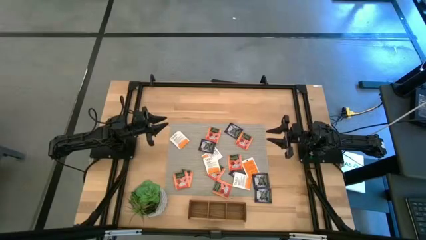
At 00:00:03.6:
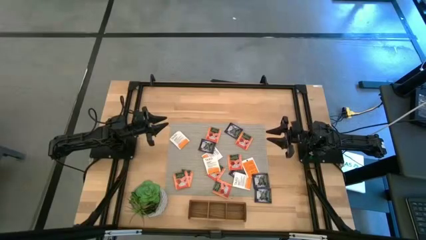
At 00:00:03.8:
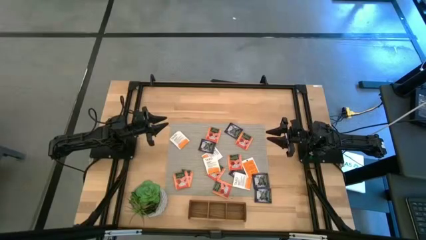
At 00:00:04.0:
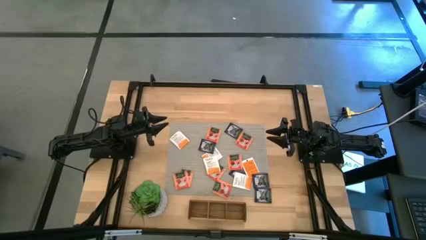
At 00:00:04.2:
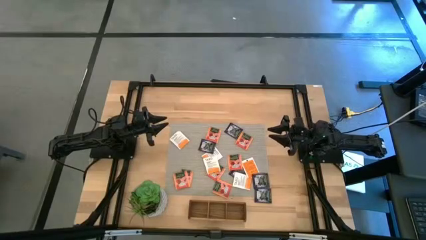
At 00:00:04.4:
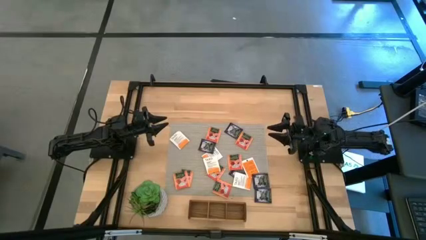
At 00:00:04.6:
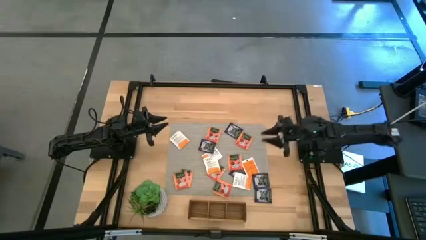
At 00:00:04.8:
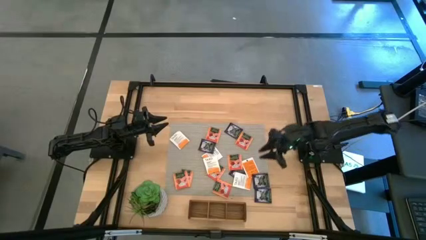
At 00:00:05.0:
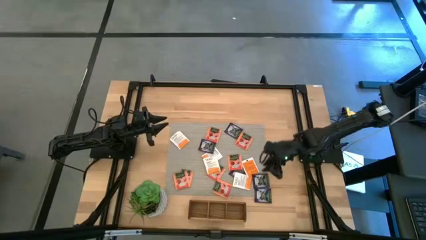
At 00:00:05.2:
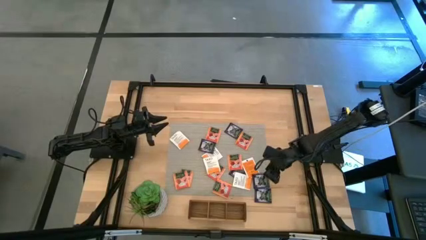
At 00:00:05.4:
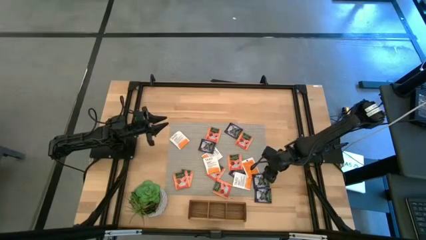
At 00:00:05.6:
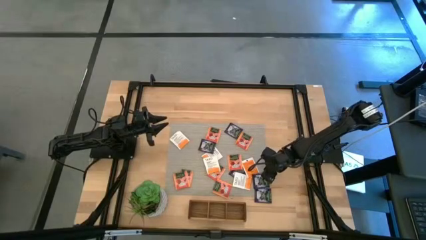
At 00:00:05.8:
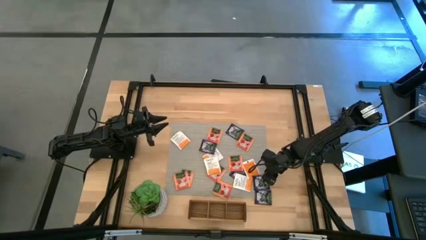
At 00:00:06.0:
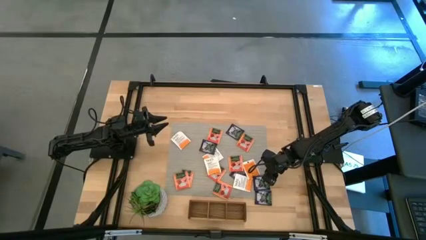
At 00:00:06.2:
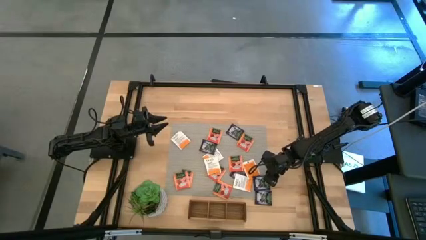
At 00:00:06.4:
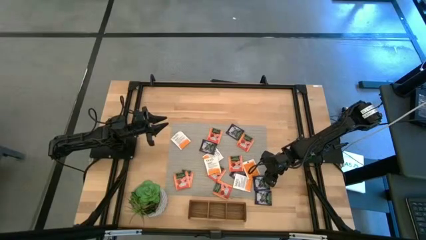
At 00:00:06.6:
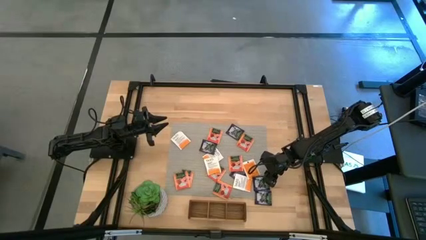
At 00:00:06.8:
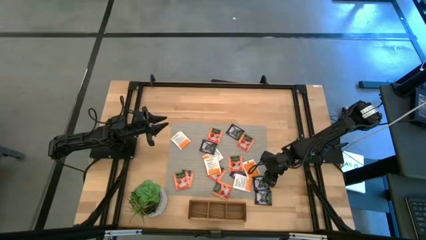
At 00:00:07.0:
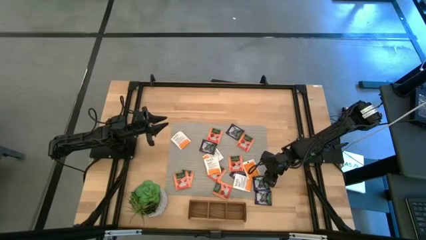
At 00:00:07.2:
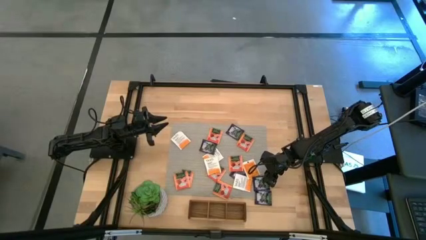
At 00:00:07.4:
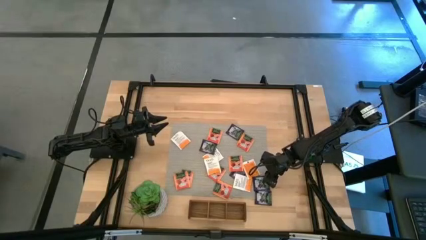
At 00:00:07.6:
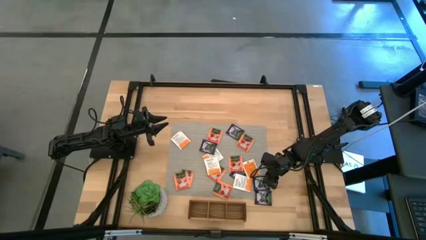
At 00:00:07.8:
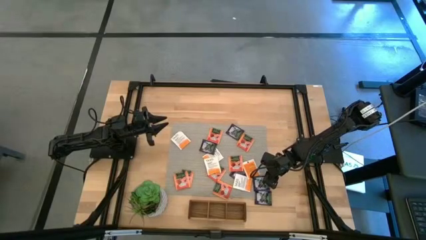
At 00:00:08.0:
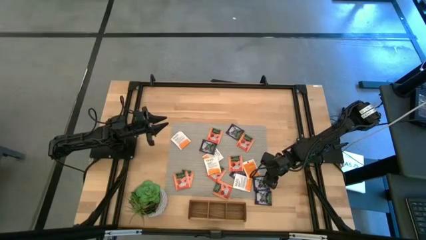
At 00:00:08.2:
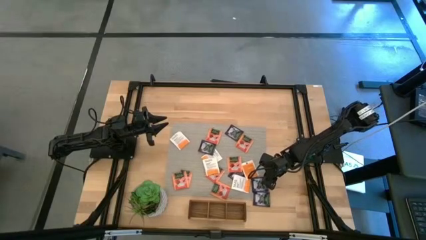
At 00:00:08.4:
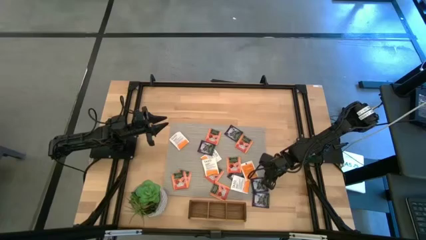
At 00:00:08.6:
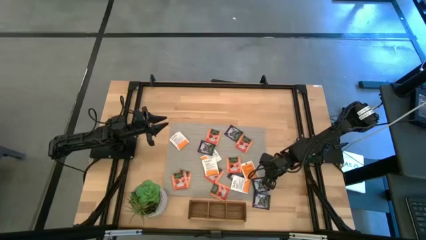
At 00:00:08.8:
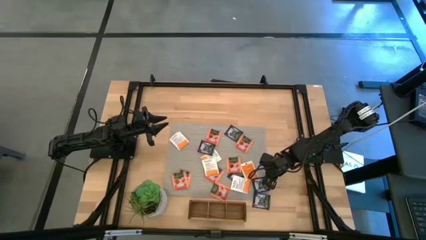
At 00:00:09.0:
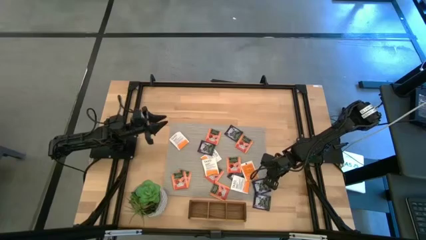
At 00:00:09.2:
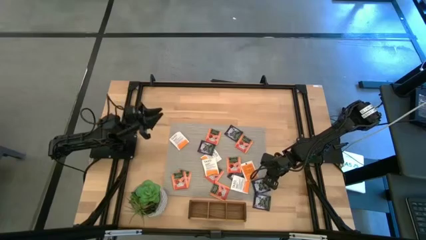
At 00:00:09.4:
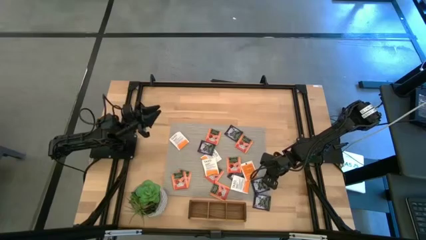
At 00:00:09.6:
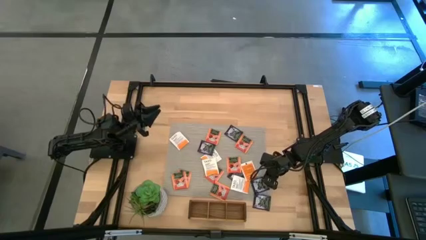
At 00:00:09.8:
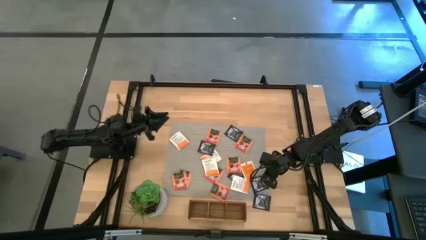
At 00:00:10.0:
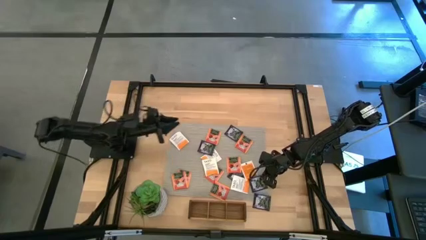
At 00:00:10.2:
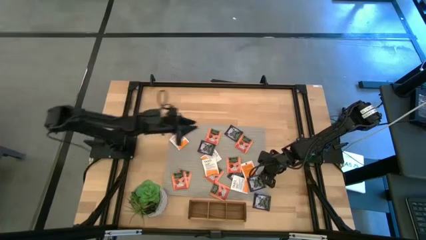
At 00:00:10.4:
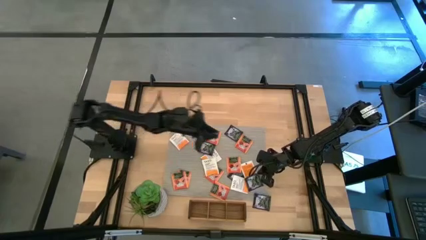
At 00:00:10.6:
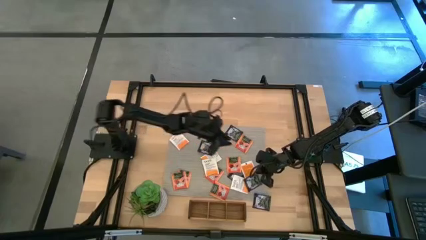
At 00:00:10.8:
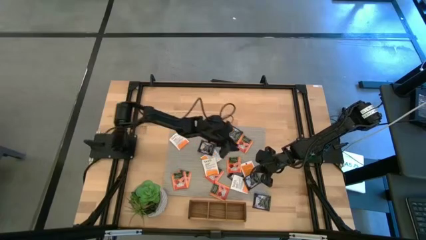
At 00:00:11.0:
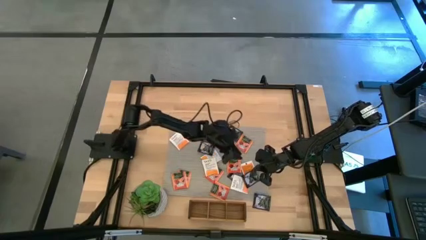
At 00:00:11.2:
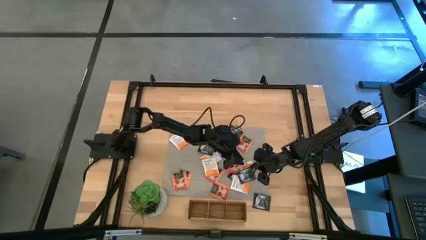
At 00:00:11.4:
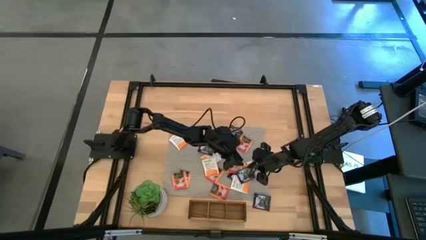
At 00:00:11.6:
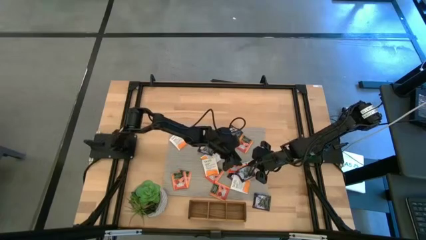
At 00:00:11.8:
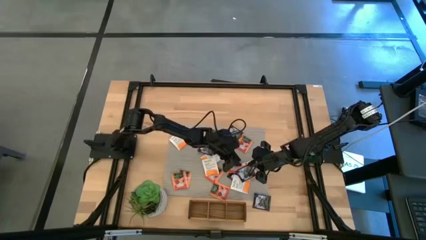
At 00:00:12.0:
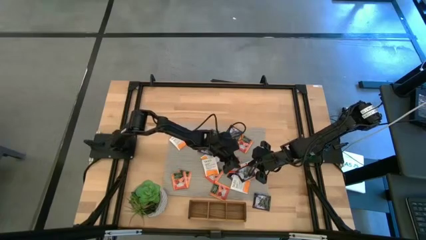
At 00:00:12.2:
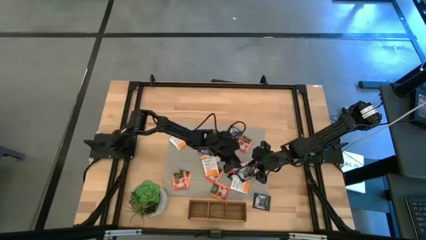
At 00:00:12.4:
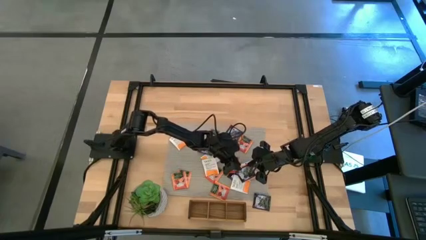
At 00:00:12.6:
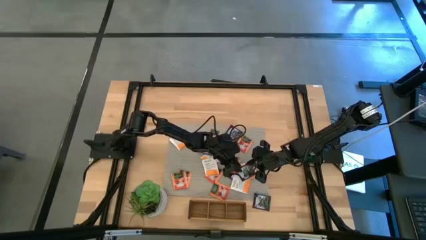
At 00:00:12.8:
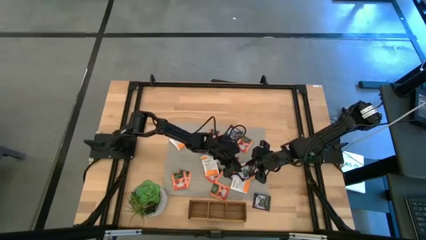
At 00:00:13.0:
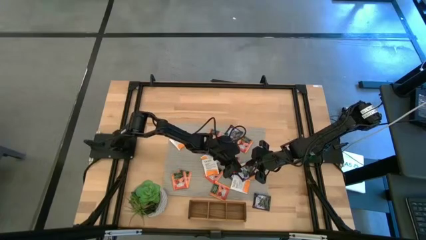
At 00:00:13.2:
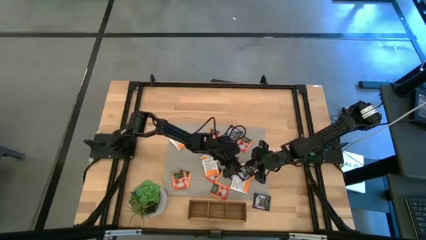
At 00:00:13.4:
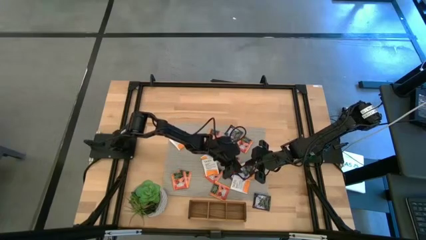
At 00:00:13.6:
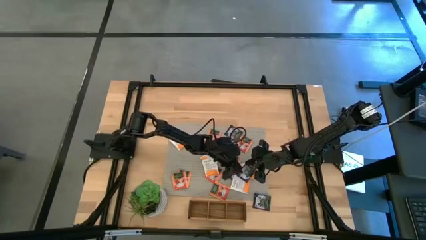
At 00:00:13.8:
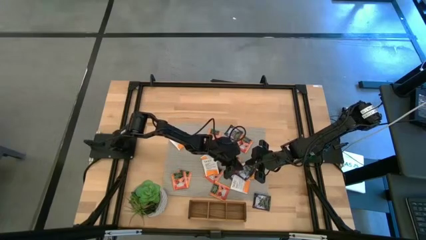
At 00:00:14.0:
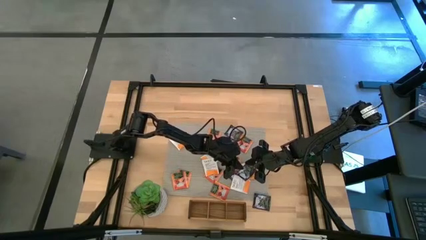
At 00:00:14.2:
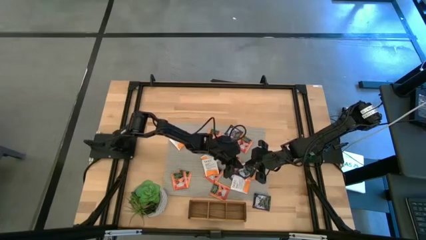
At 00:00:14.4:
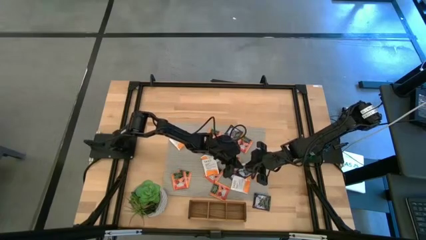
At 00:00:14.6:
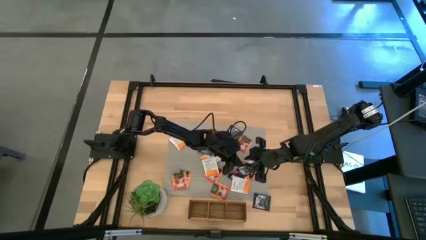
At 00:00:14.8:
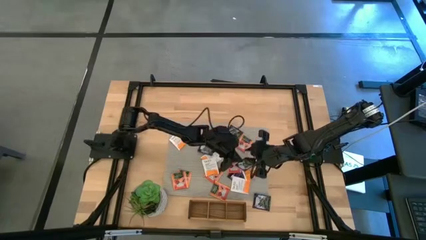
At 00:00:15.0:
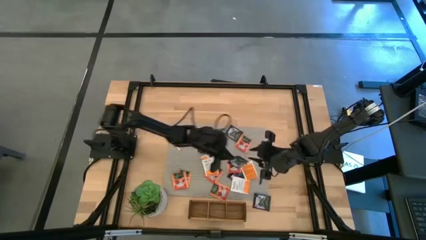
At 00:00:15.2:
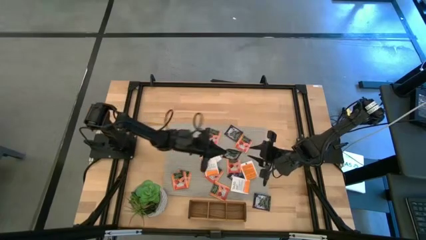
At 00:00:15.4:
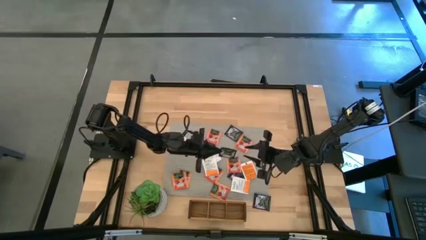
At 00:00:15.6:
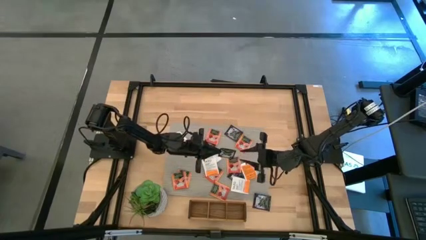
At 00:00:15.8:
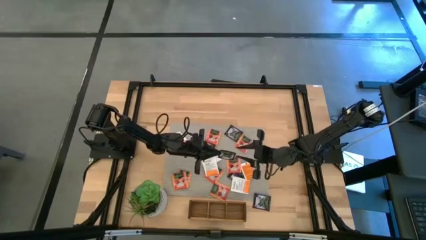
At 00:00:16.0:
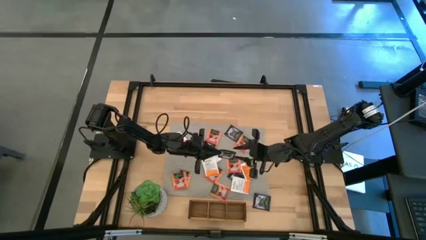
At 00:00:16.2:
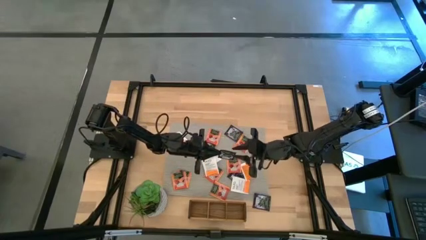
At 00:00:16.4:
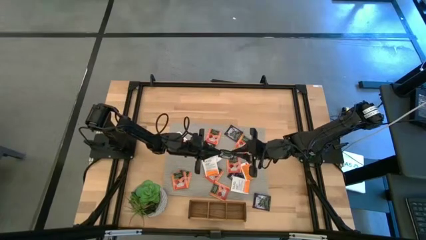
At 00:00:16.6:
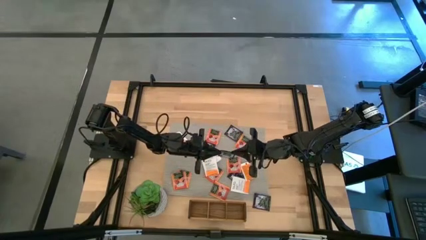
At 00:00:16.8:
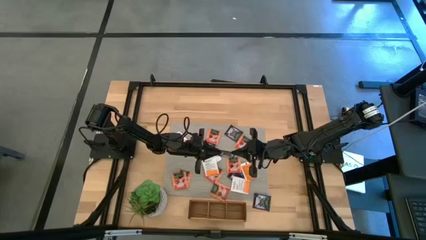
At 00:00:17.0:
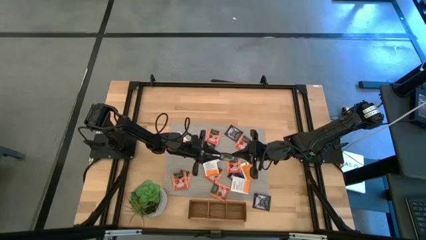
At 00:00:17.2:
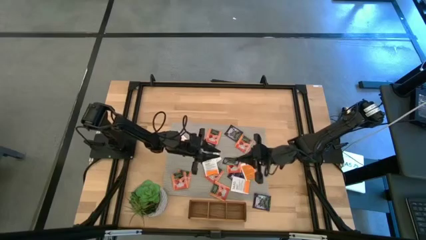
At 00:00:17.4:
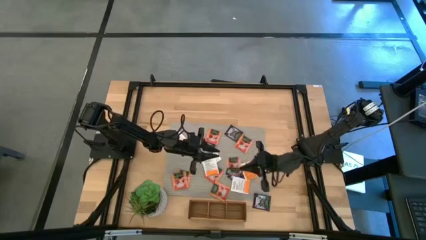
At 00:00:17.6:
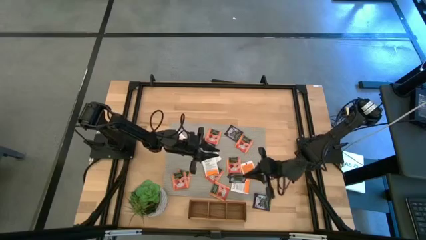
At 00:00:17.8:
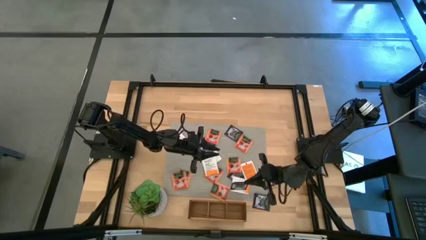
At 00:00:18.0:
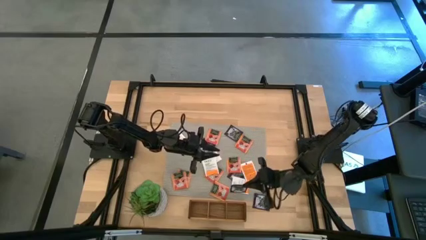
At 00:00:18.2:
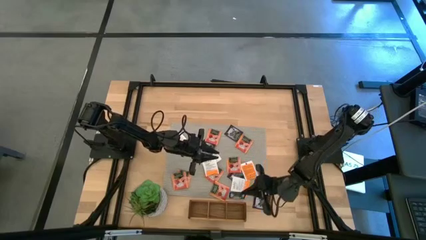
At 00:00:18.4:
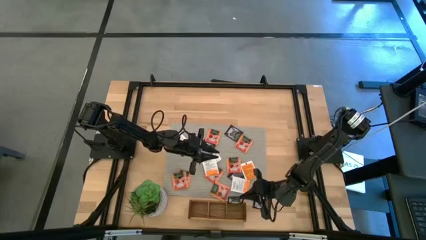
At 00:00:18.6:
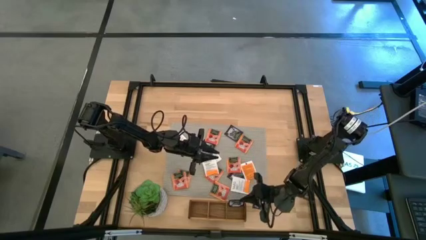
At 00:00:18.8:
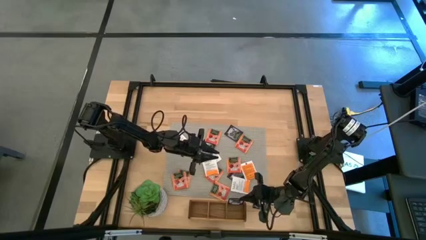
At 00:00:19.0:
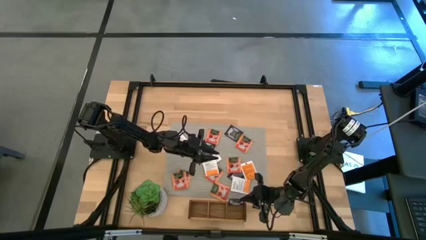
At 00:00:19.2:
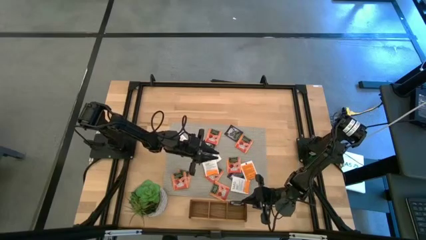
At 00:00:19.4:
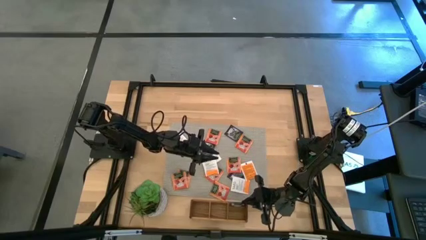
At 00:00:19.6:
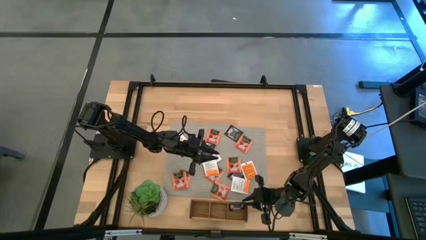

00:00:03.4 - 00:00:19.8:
Task: Pick & Place Tea
Put the black tea bag into the right section of the wooden organizer
